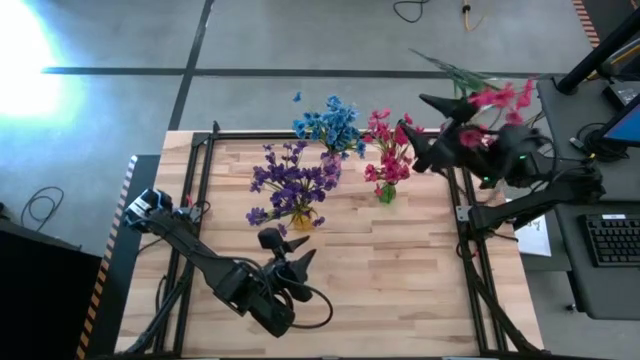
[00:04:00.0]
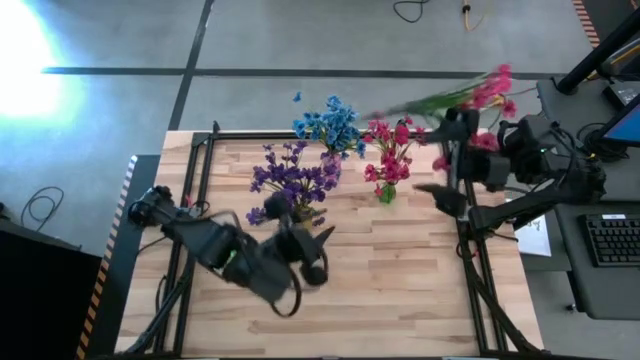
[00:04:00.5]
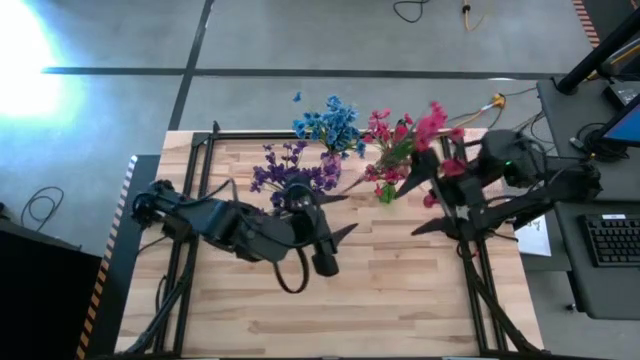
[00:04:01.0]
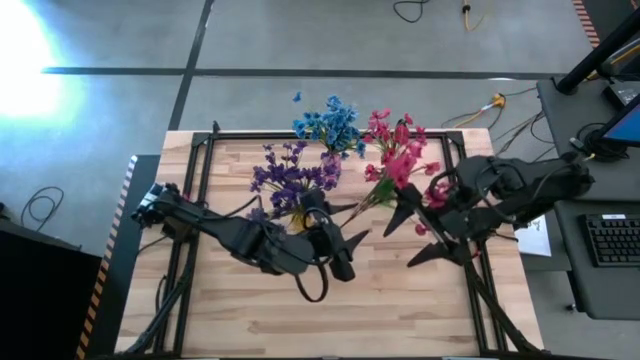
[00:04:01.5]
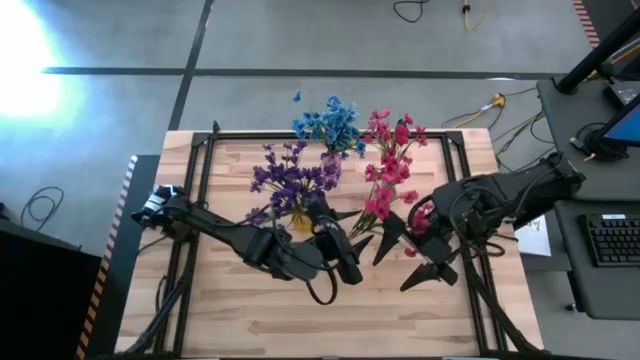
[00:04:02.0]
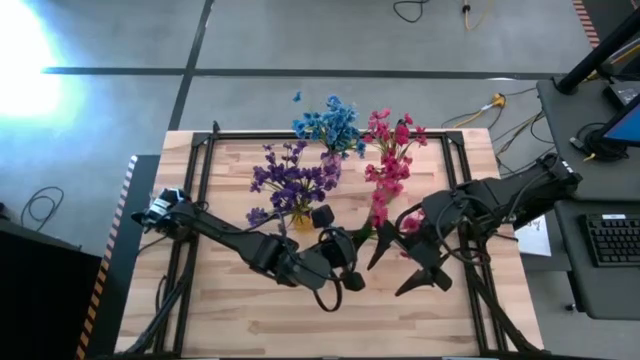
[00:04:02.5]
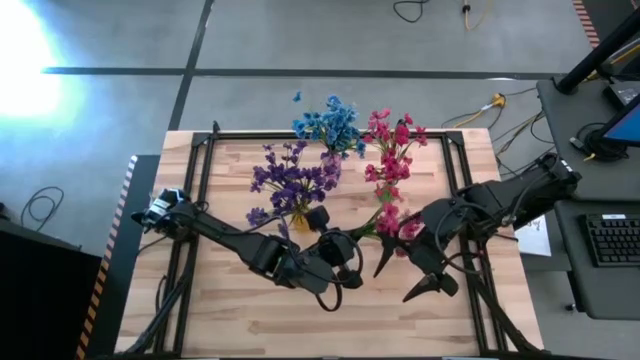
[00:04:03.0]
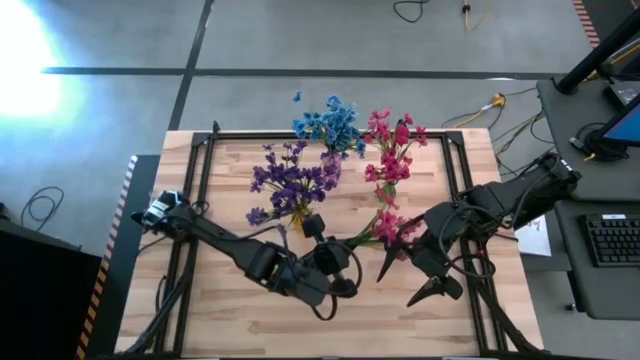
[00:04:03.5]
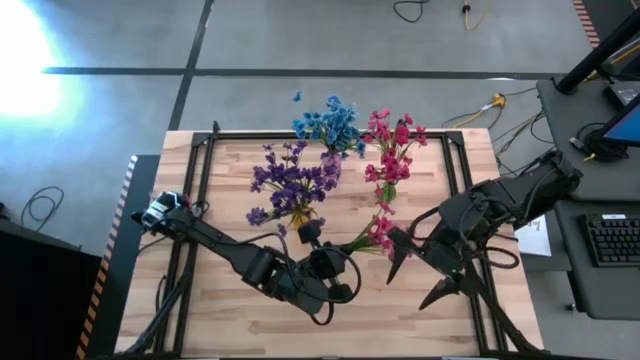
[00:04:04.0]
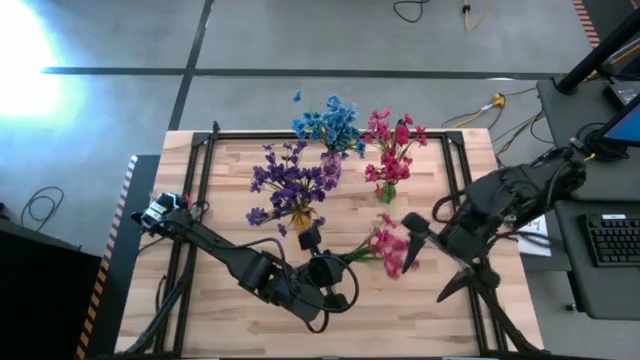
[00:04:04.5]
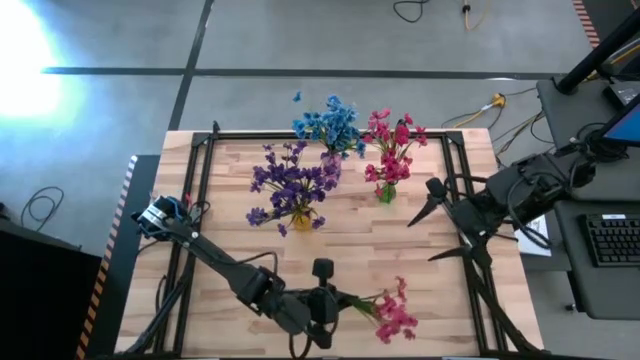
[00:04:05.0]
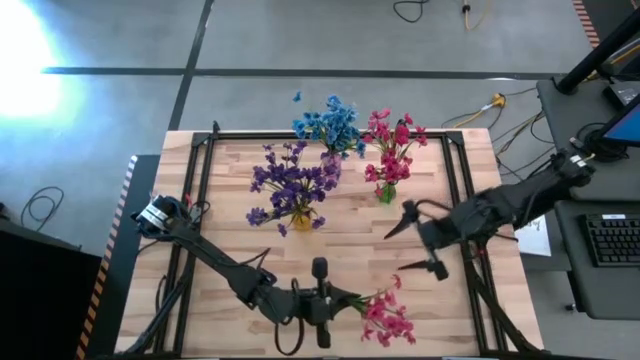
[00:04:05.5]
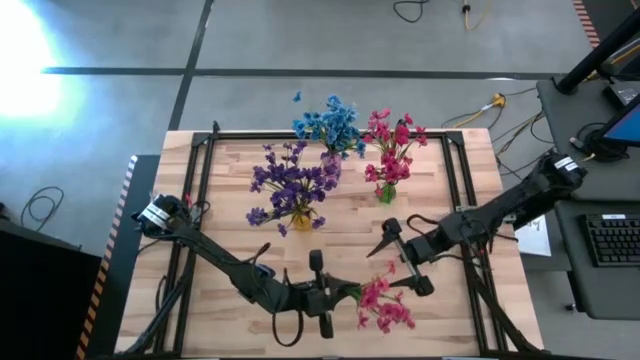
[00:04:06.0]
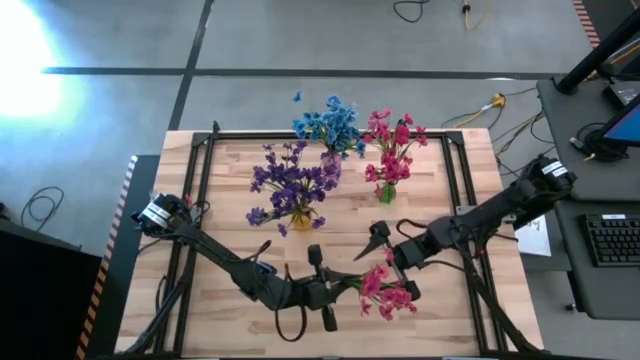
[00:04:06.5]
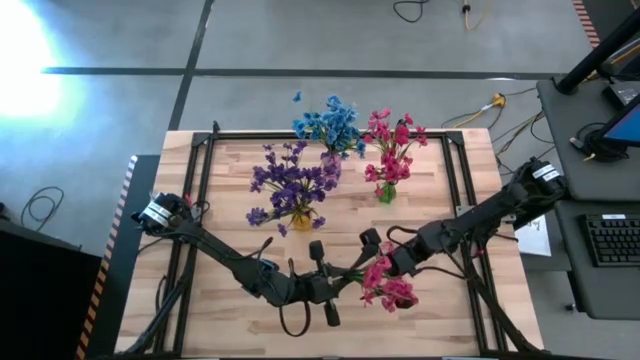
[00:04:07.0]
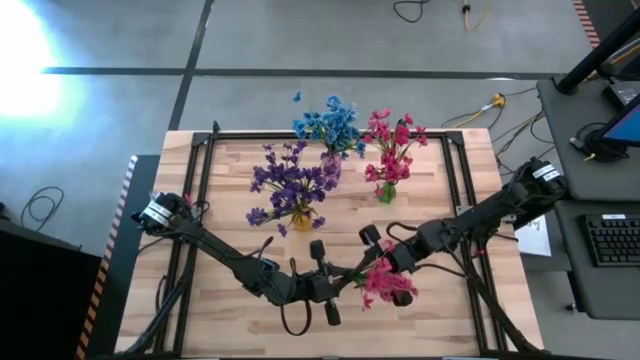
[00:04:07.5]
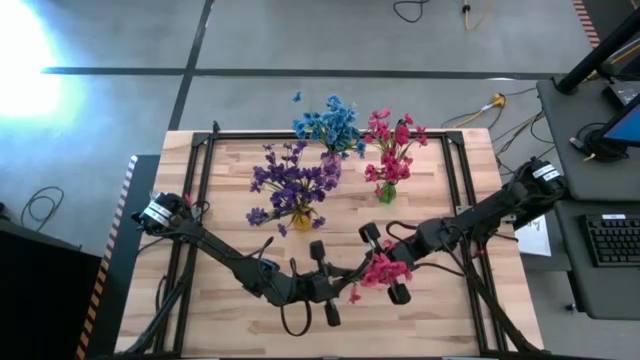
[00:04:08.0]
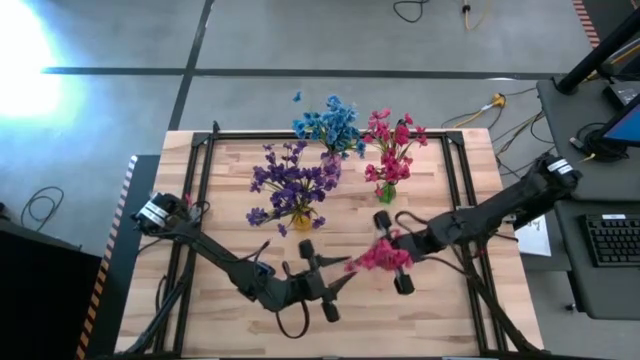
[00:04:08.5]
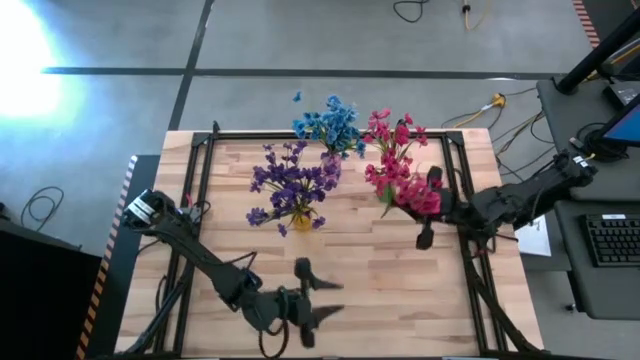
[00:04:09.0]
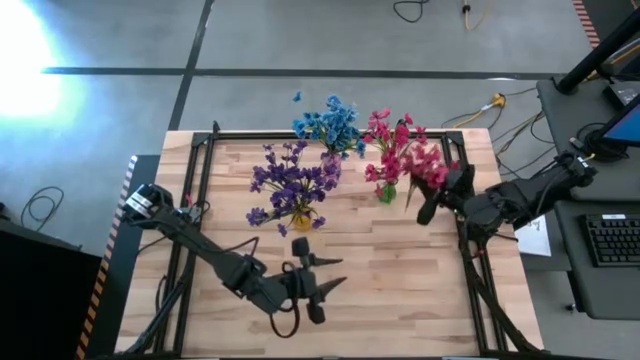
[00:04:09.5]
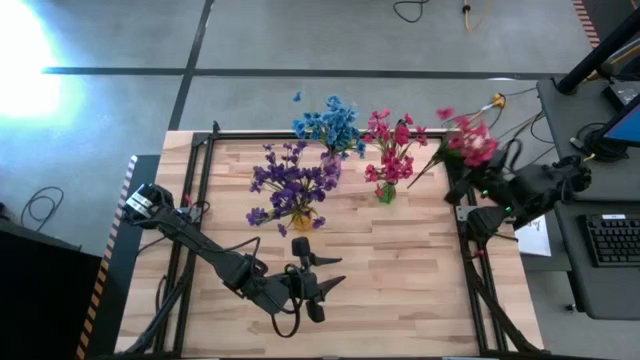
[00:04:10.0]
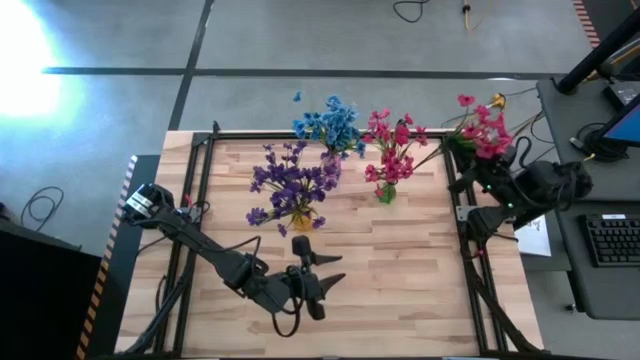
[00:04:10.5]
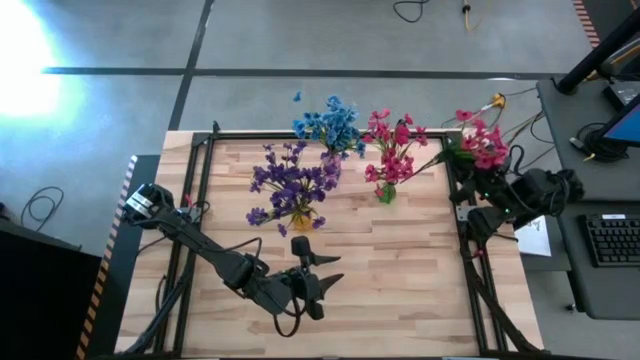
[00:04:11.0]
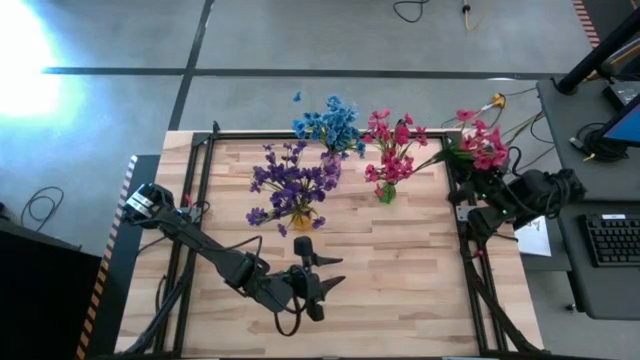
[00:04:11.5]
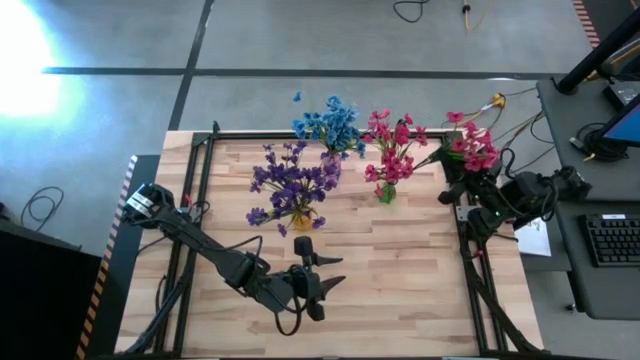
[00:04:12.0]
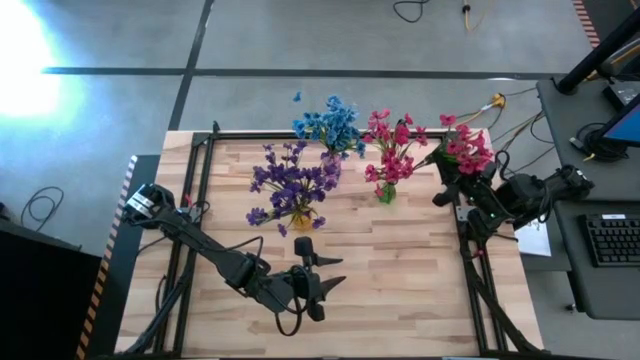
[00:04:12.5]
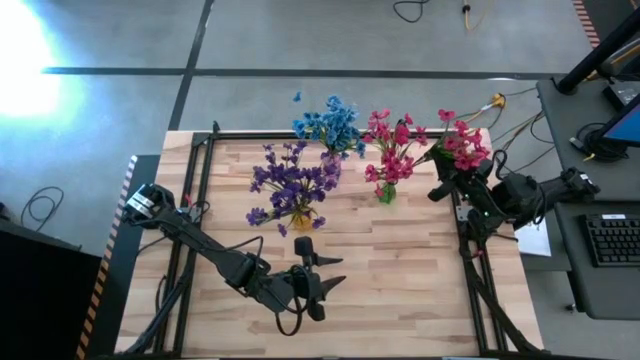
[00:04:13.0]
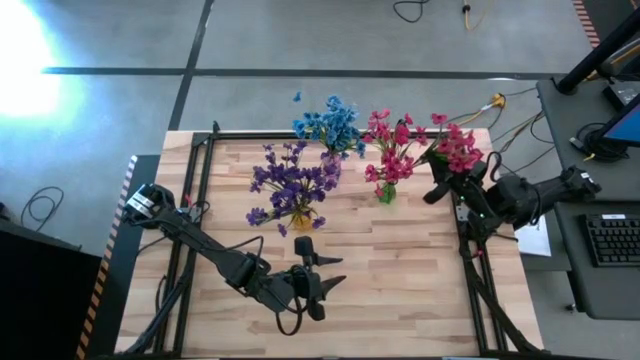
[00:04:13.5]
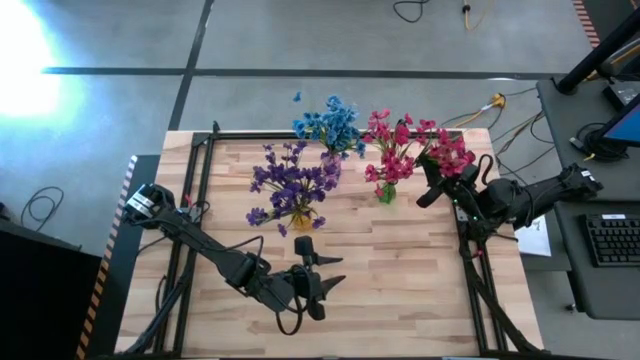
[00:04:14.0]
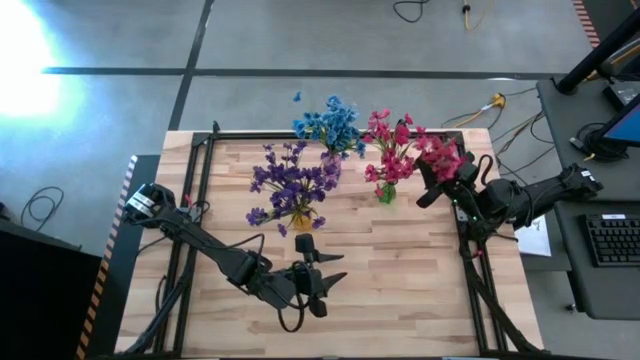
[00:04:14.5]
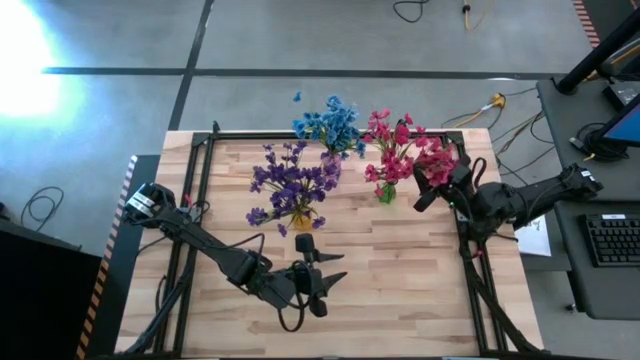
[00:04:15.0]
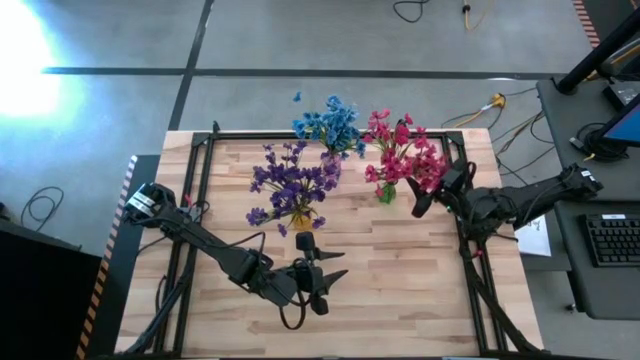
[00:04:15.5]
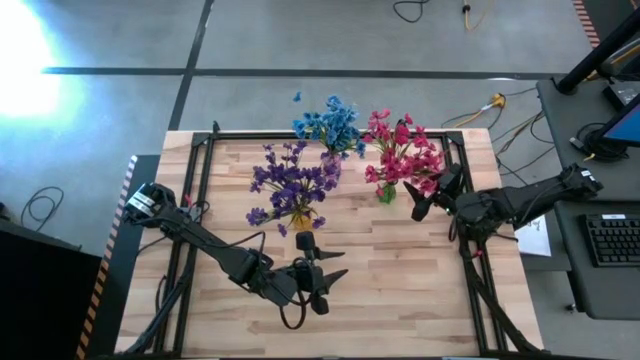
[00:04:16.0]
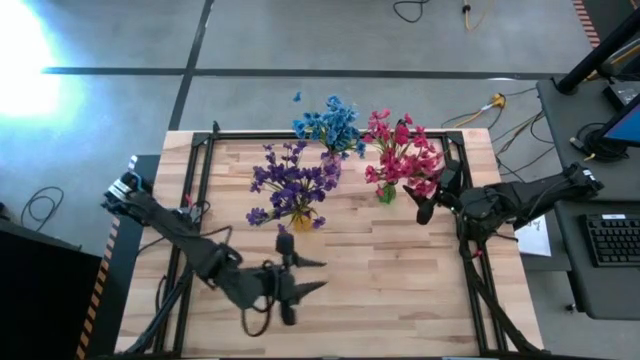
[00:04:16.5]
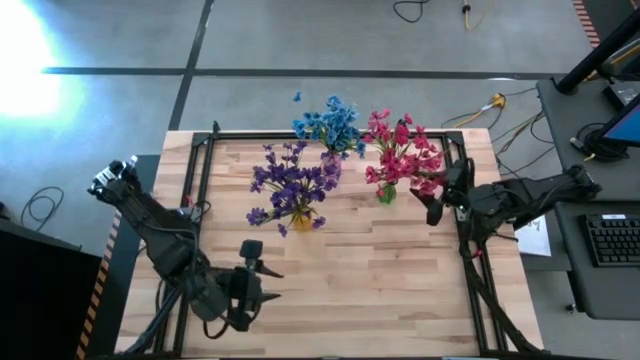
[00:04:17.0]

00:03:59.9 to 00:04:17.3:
Task: Sort flowers into vase by color
Put the pink flowers into the green vase
